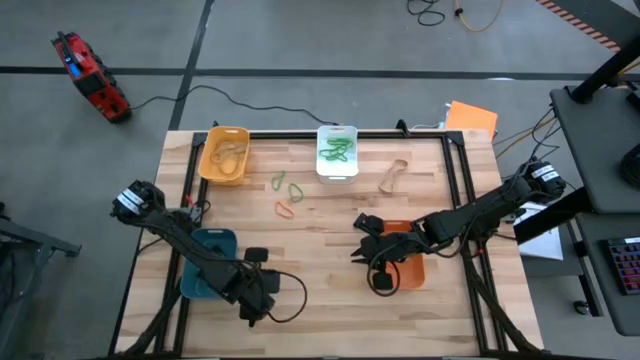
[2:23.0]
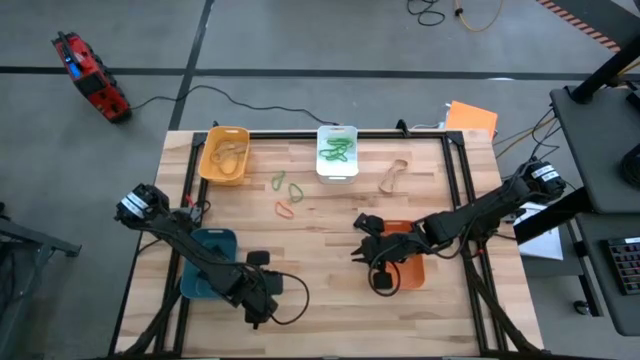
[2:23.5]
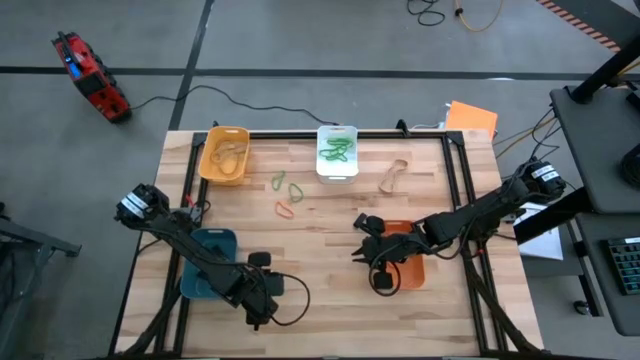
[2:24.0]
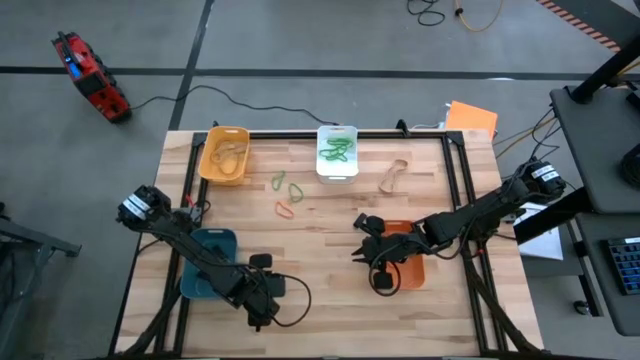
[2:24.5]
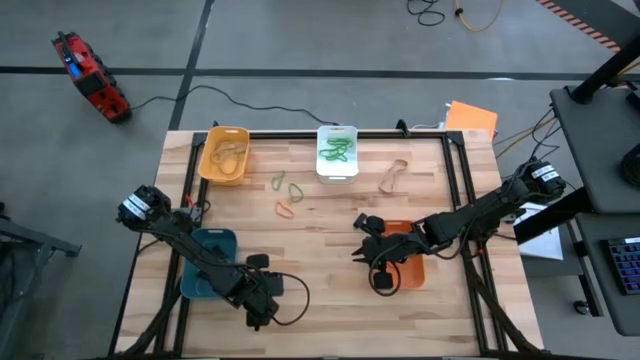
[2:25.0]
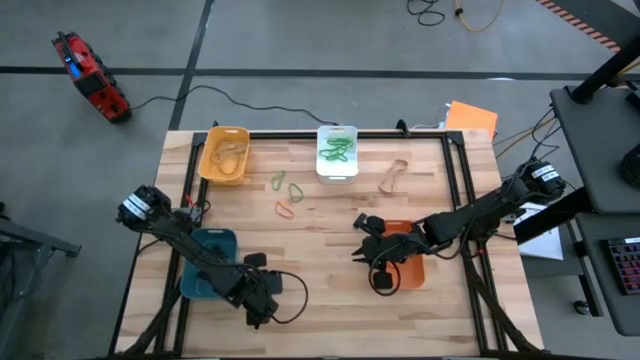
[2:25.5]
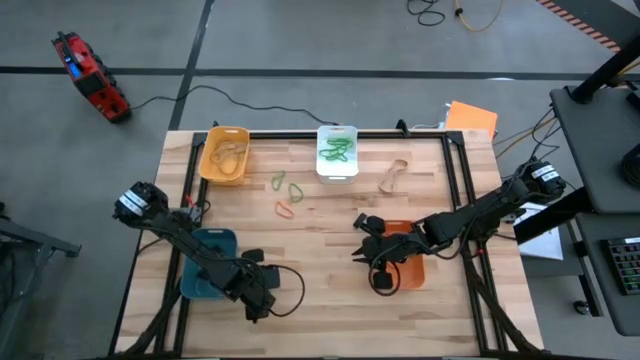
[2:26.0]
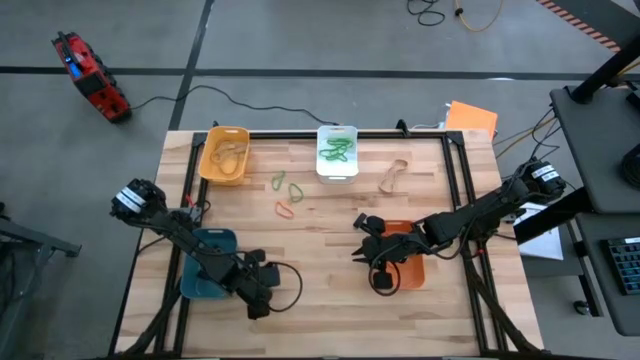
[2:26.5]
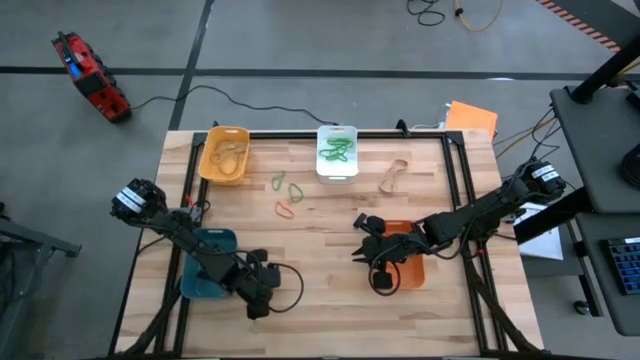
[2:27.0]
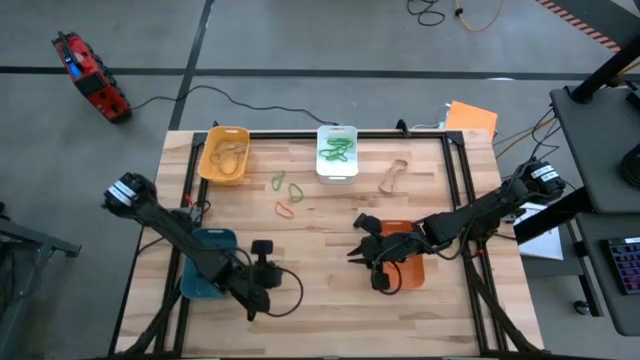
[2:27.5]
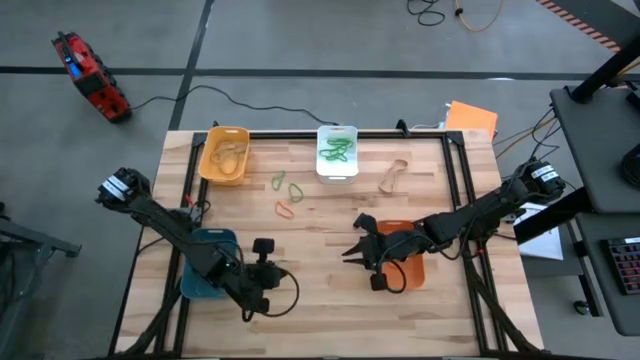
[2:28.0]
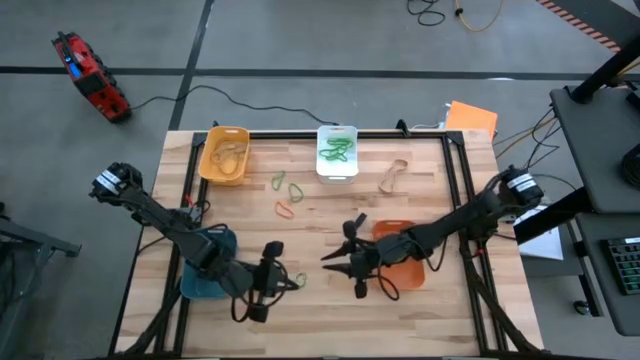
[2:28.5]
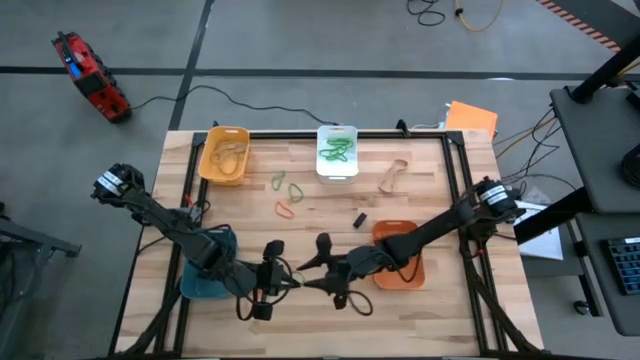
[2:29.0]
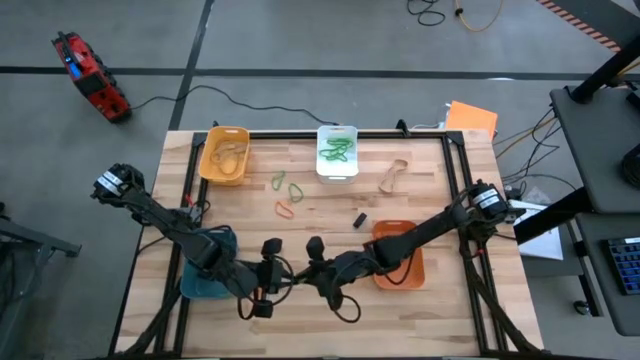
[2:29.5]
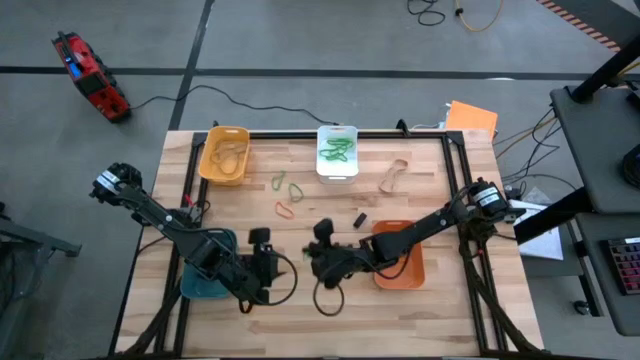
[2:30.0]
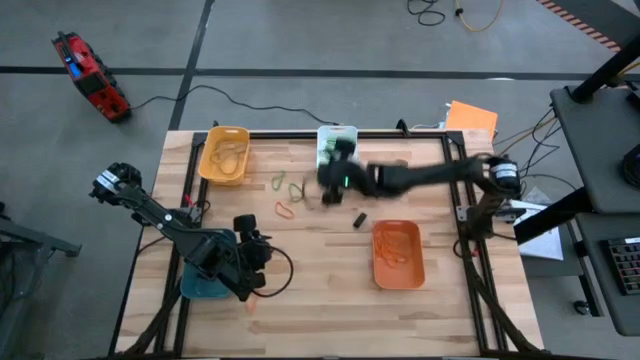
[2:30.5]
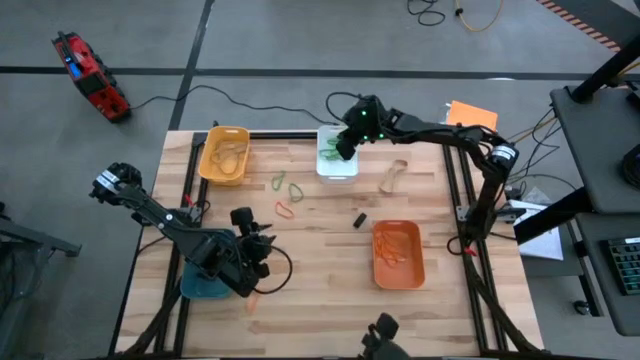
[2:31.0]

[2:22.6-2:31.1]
Task: Sort rubber bands into baskets
Put the green rubber band into the white bin

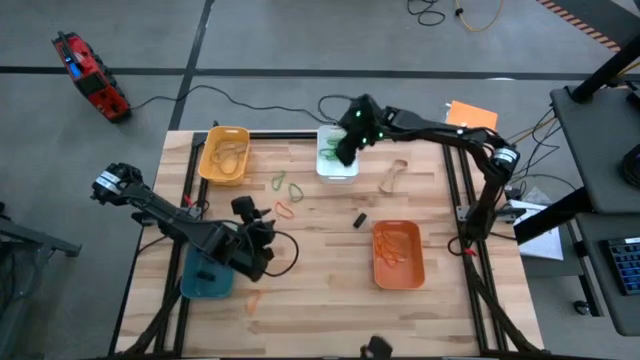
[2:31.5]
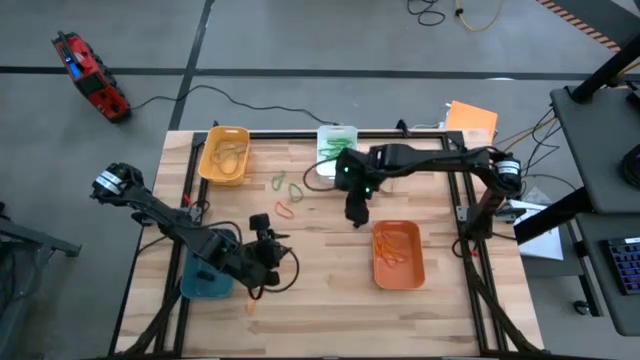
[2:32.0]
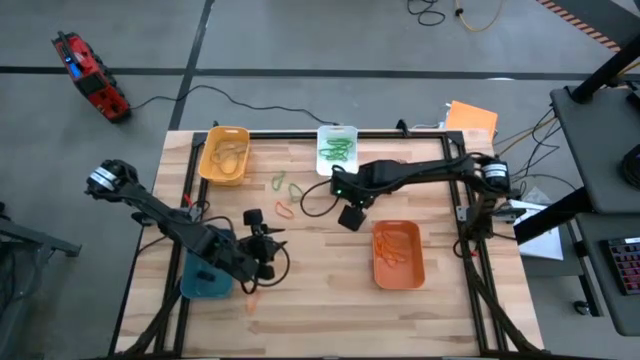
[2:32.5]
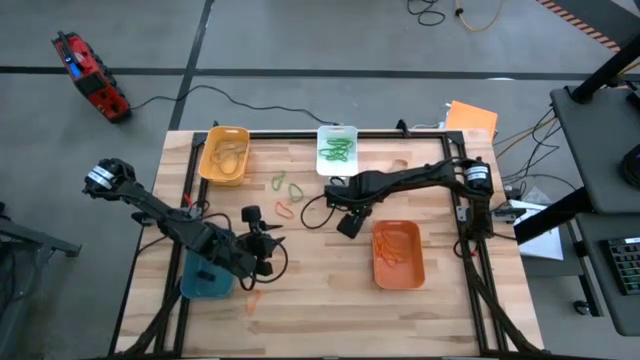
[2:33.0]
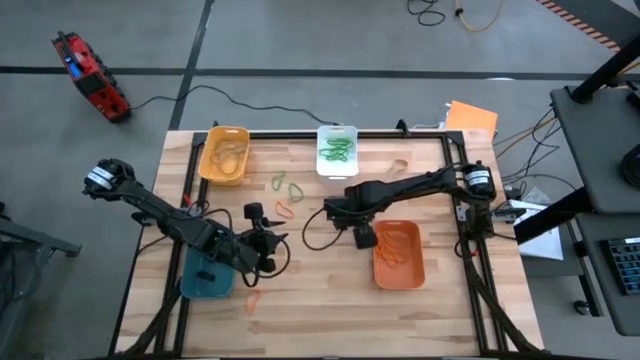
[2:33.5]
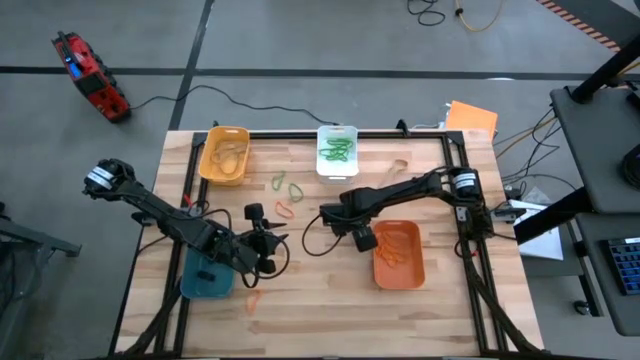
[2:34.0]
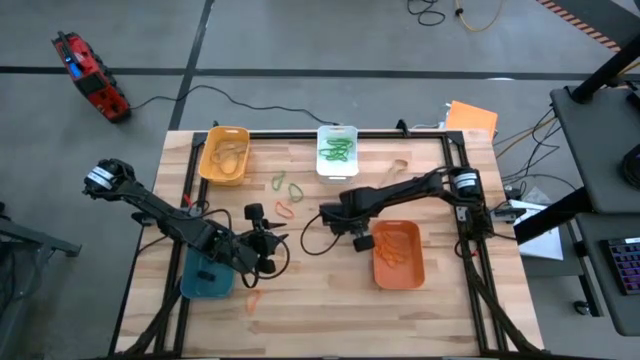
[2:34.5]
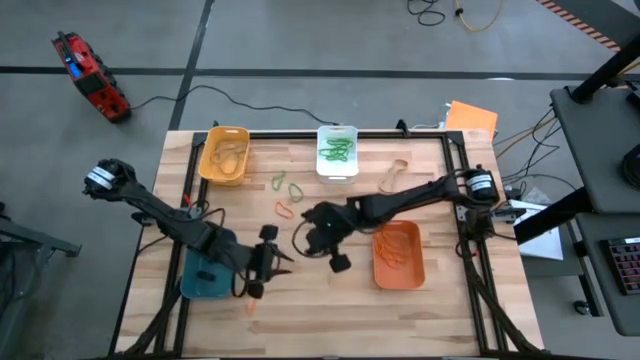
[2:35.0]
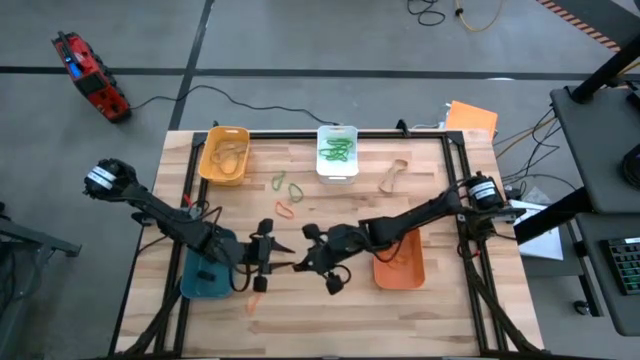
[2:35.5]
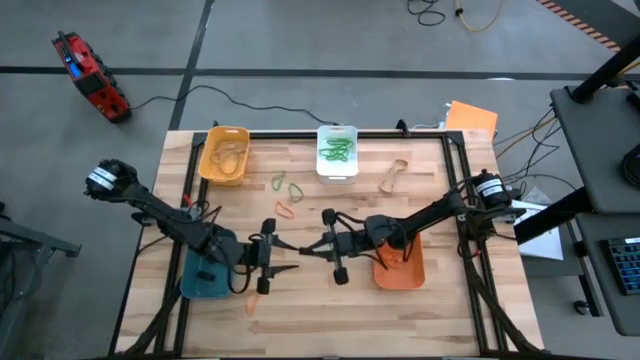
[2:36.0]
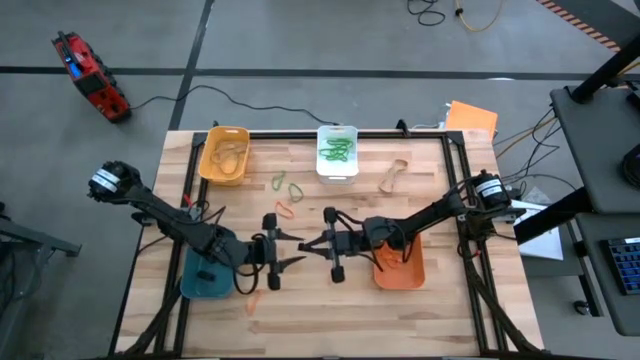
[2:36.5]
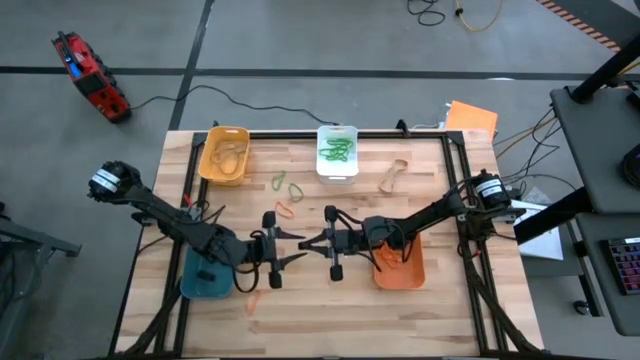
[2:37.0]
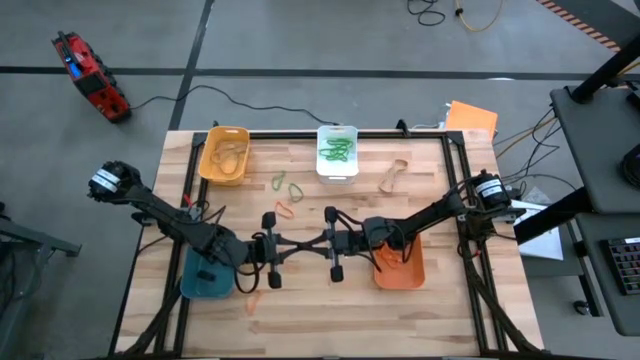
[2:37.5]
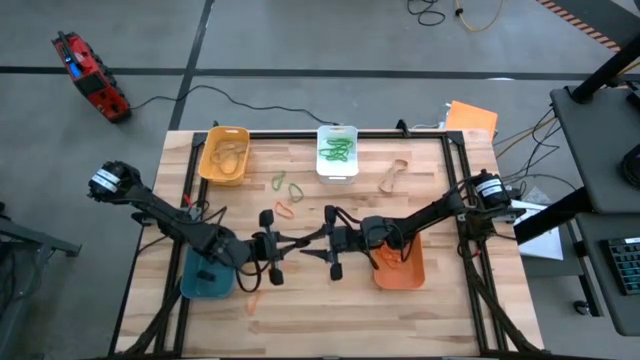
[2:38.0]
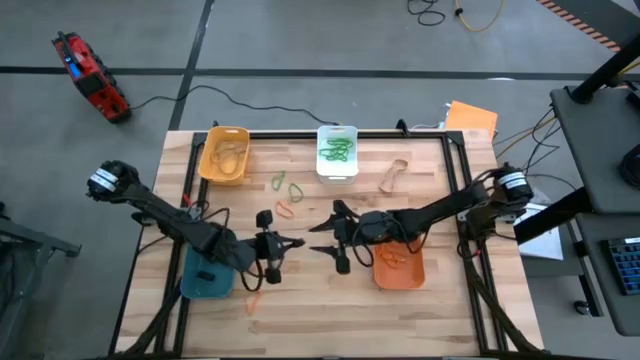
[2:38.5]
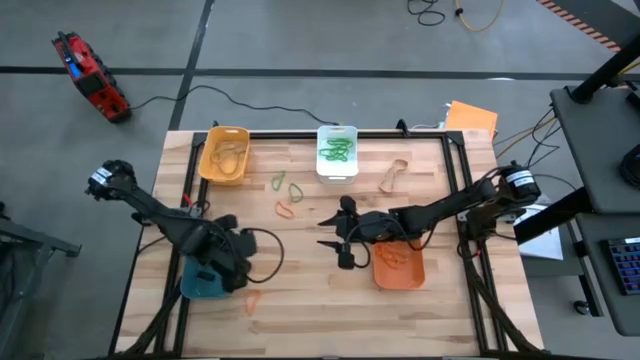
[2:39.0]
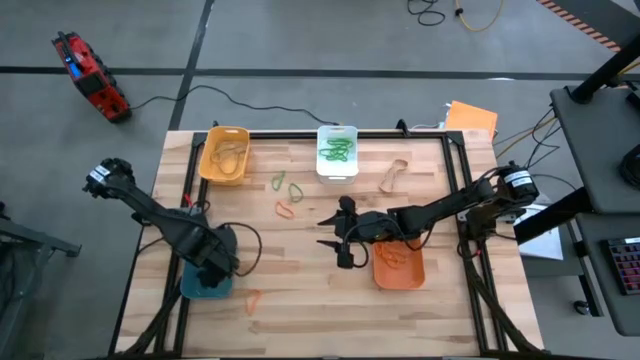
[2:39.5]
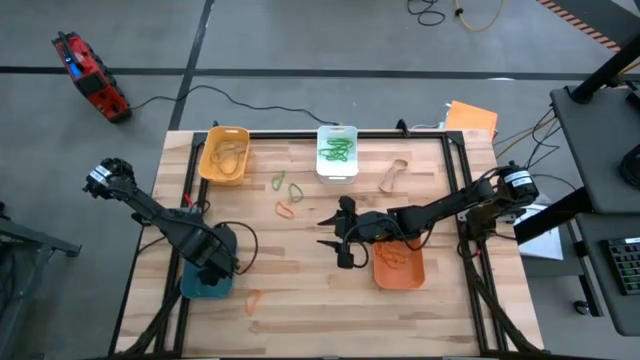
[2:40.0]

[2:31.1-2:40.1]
Put the black rubber band into the blue bin

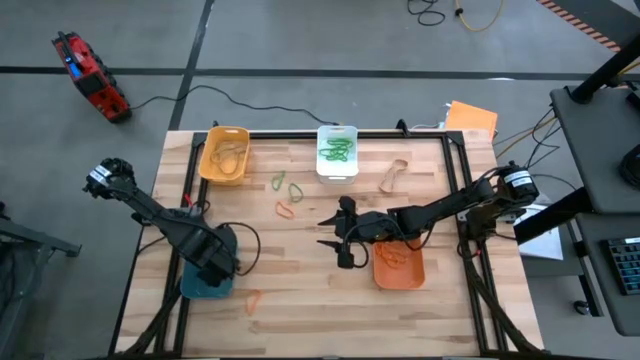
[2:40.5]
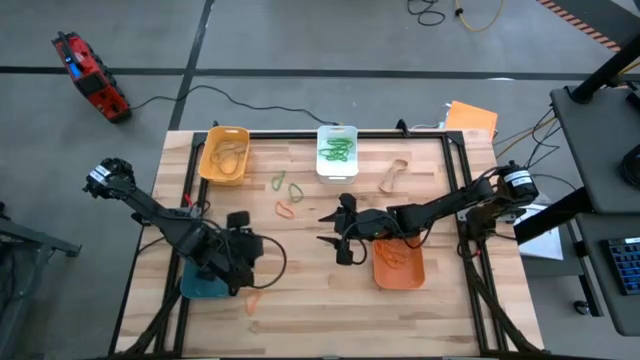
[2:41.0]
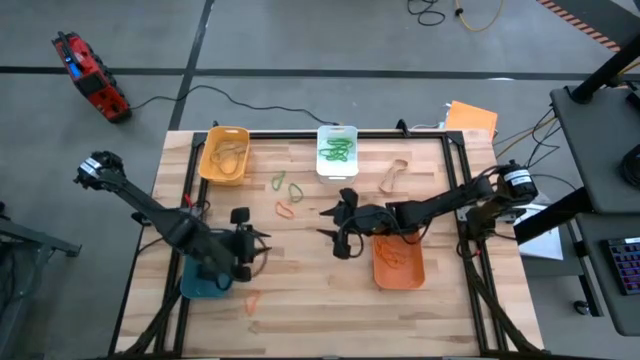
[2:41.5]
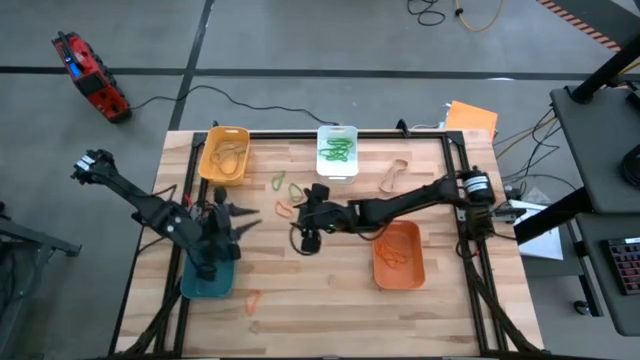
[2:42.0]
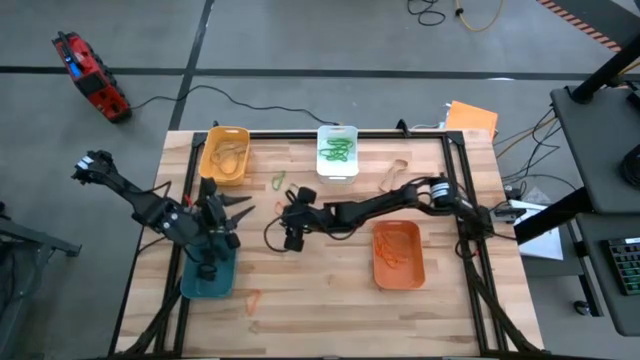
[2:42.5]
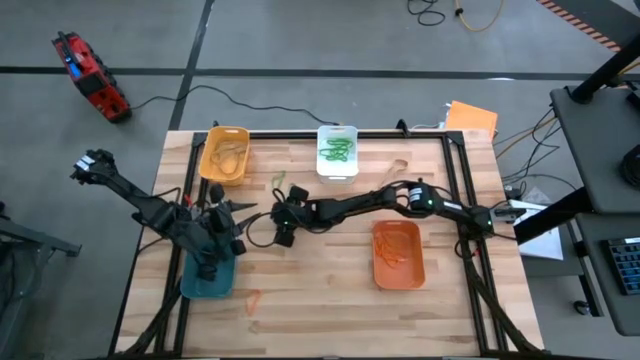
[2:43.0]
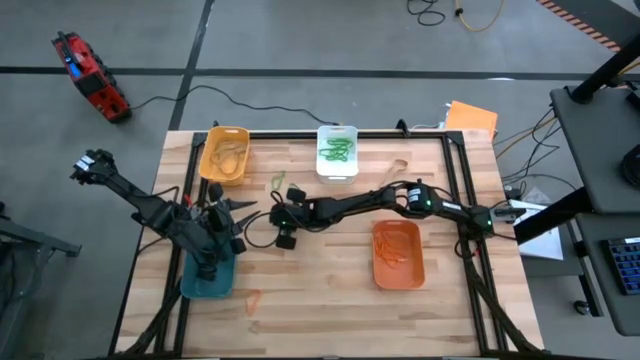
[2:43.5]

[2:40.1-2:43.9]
Put the orange rubber band into the orange bin
